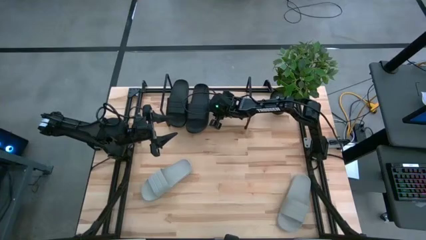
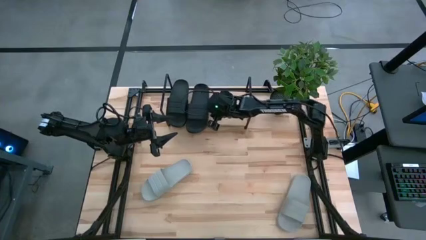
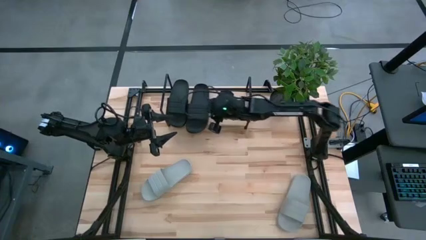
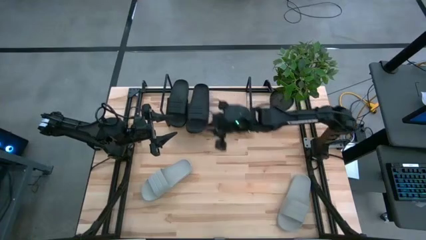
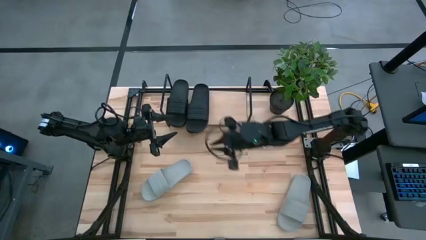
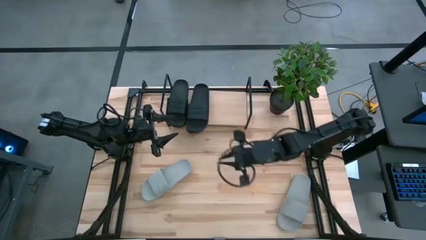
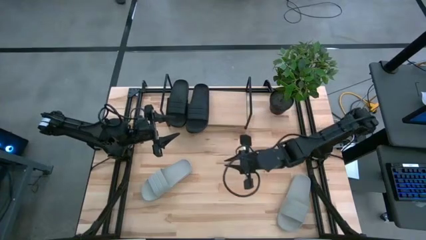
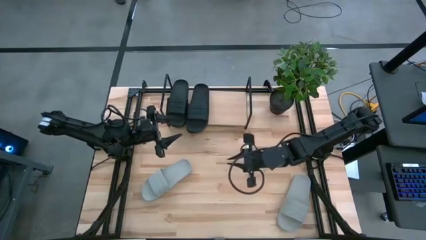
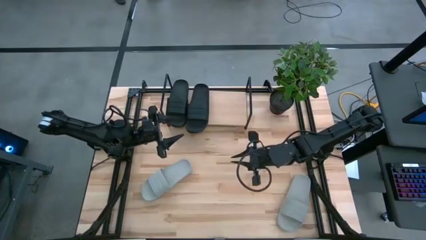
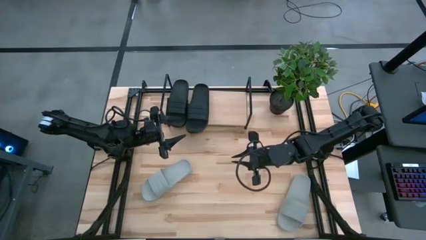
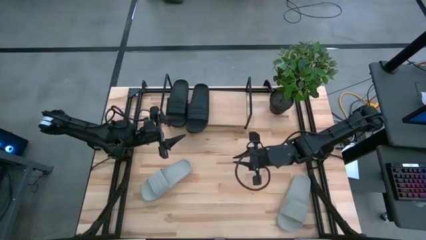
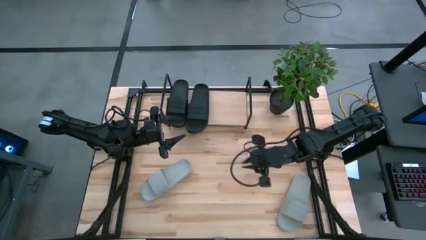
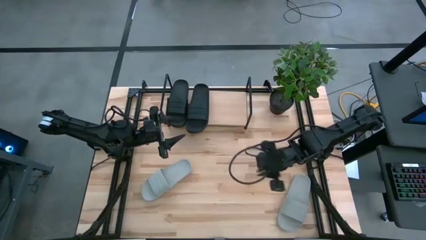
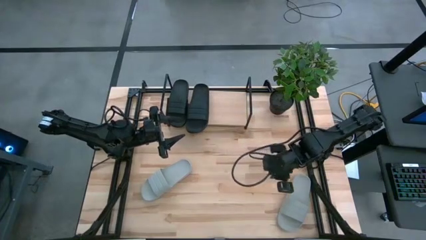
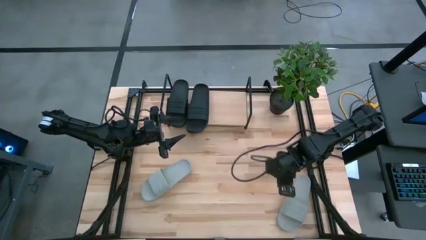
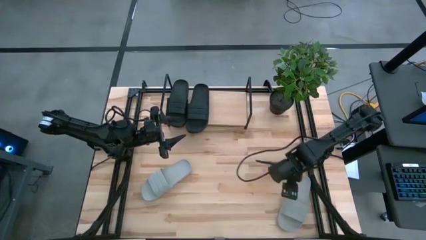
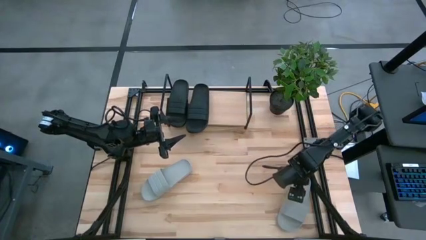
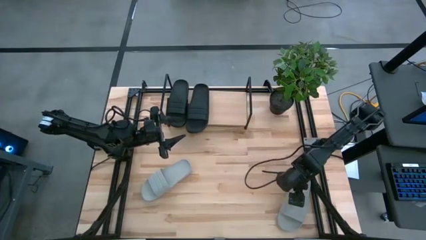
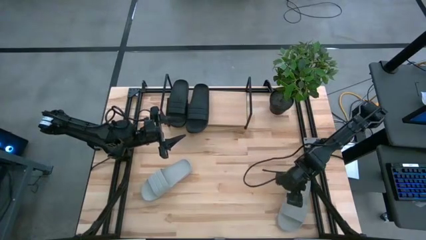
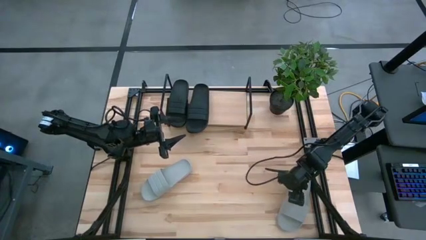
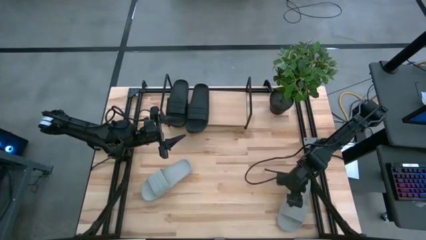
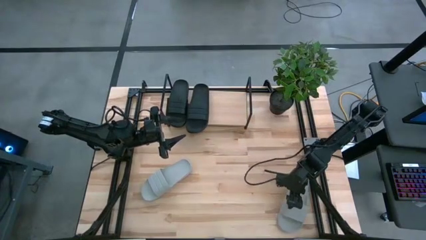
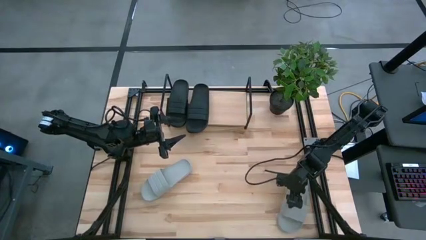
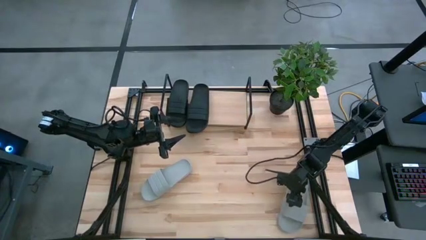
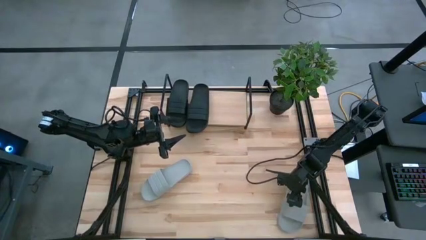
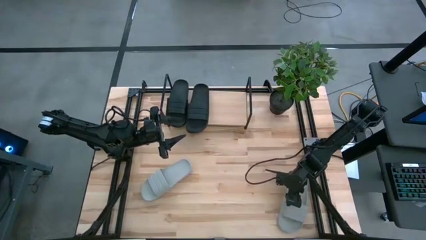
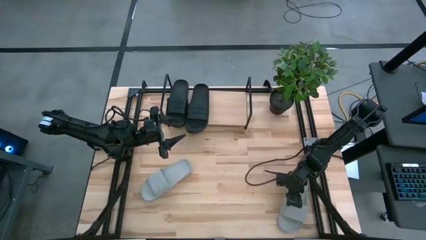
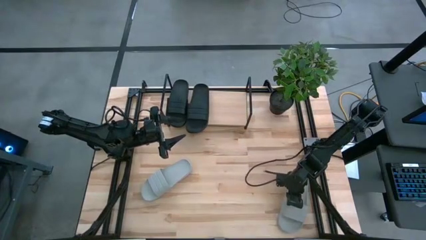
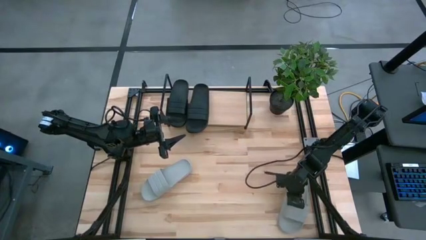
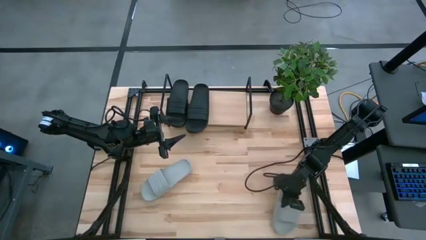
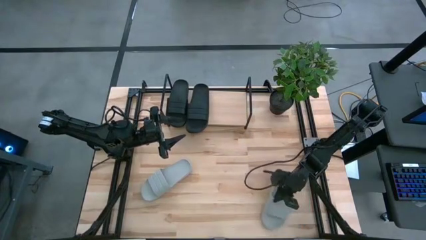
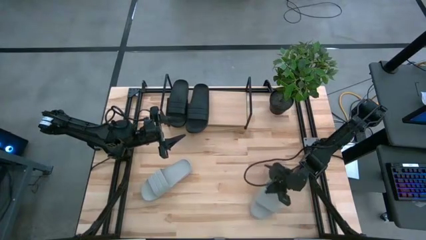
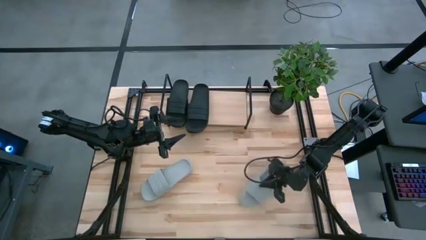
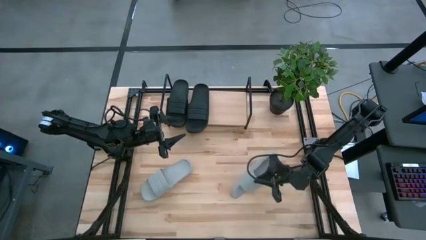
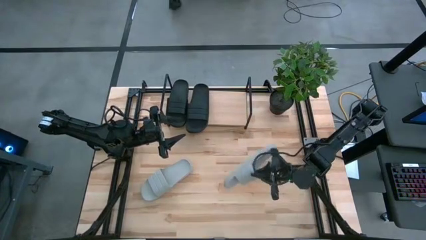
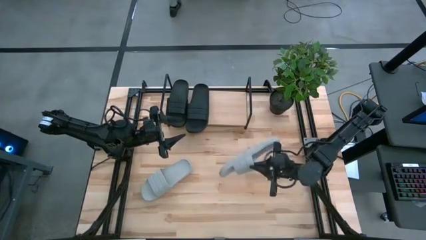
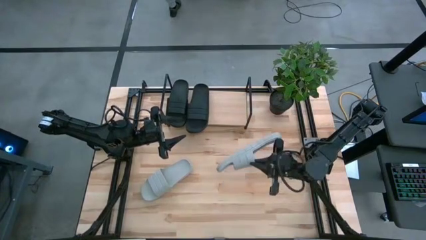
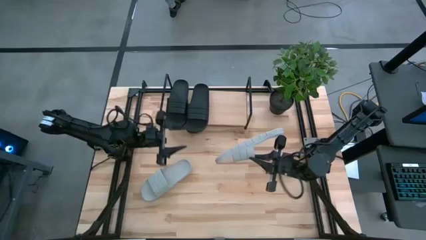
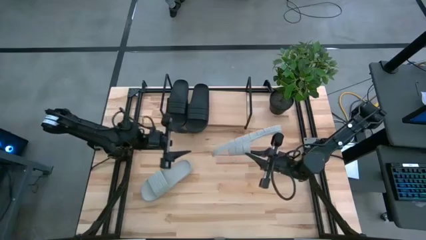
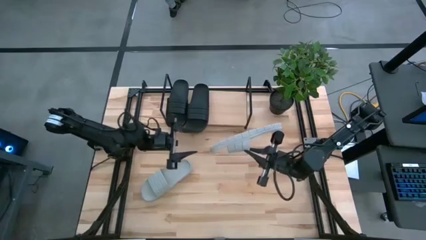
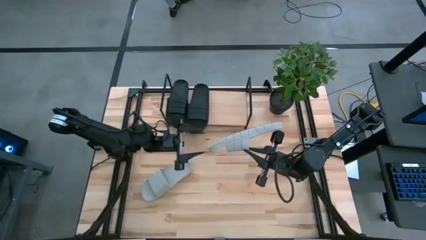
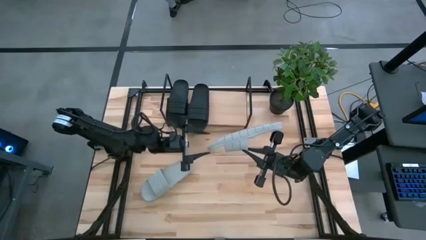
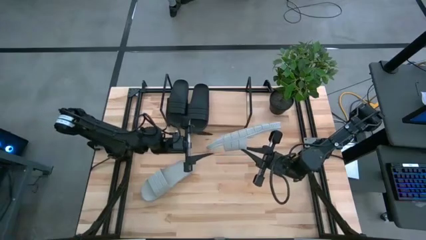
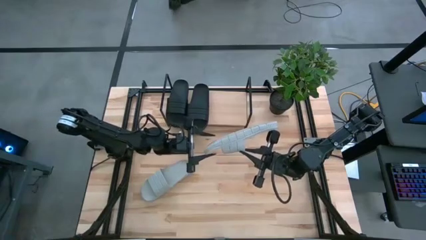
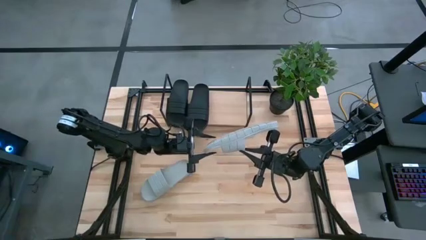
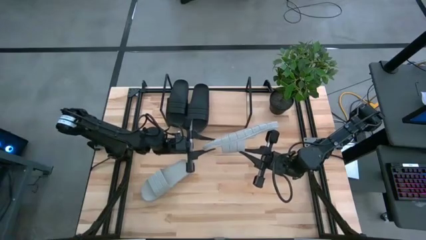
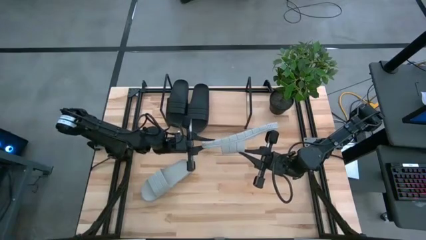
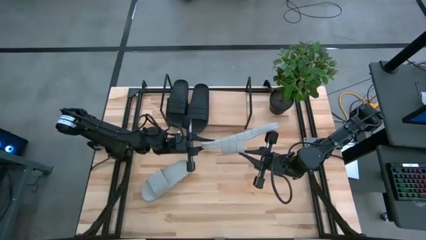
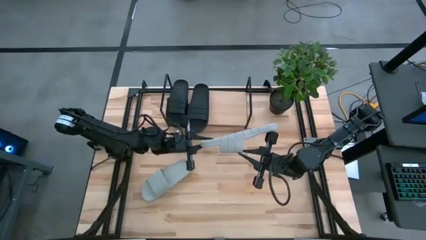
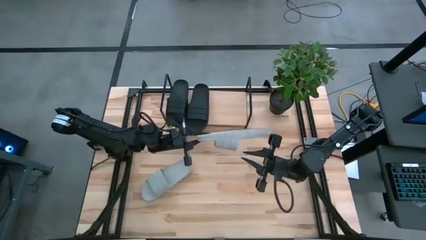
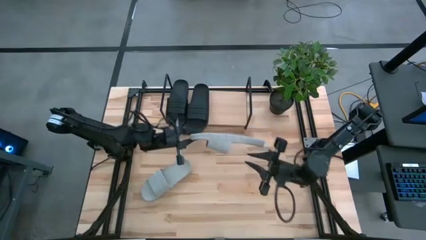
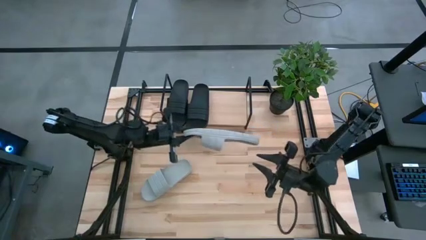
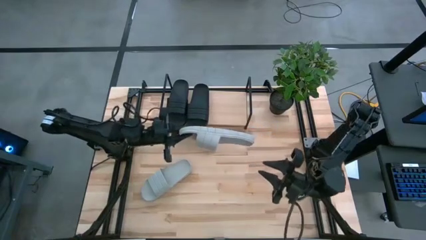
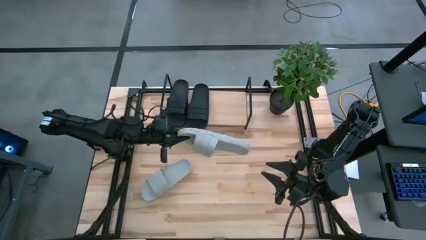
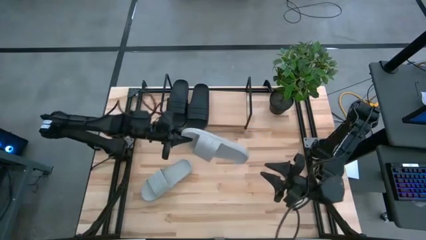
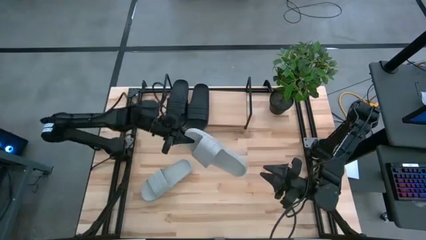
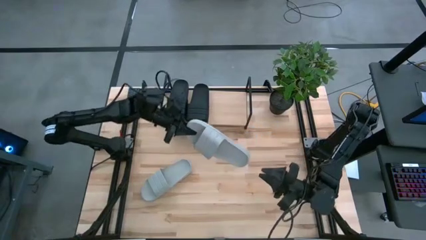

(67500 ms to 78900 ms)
Task: Pick and place slides into the shelf
Put the right gray slipper on the shelf

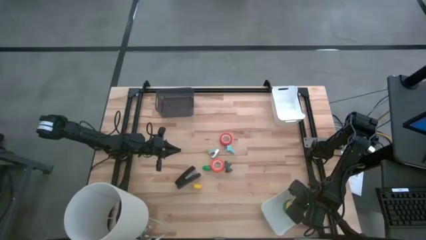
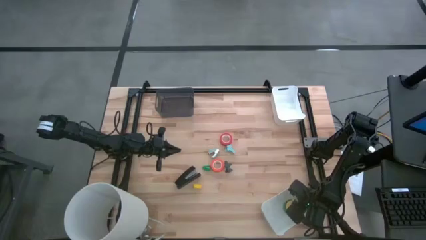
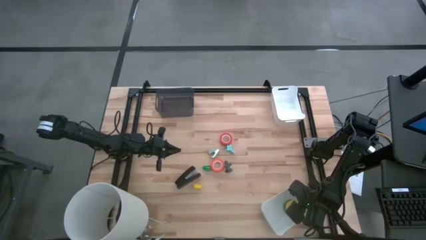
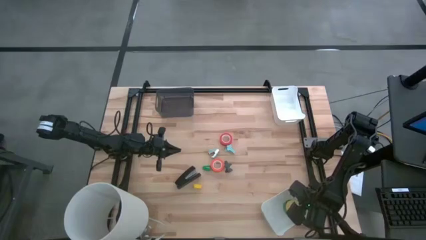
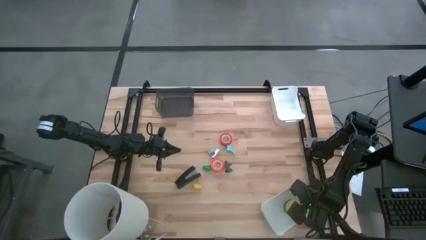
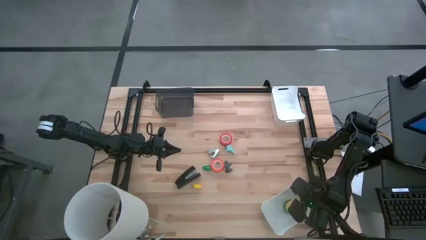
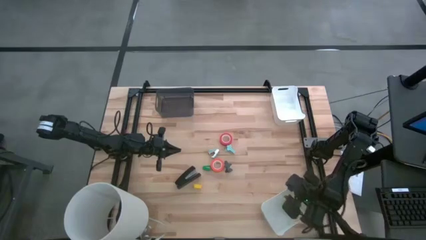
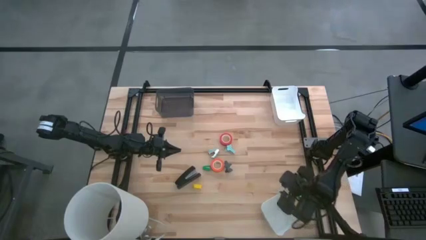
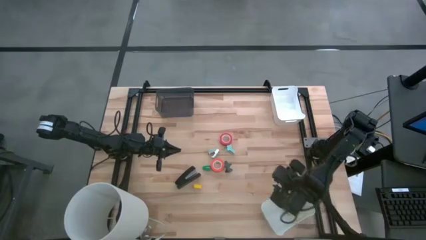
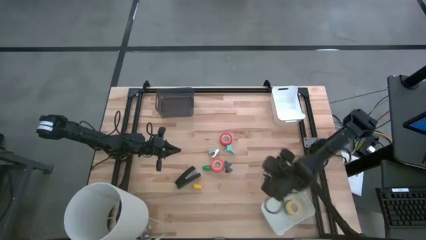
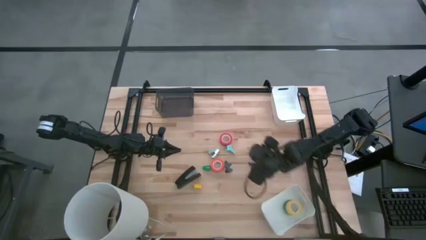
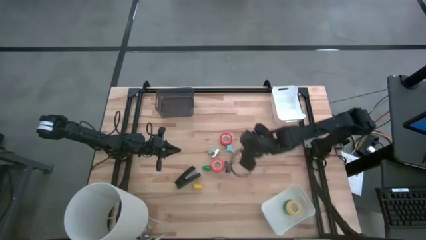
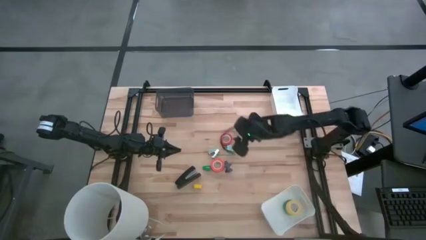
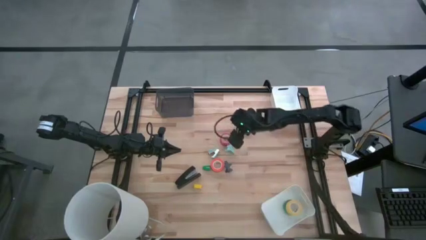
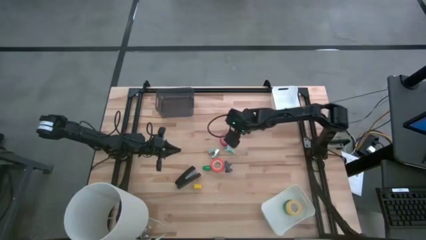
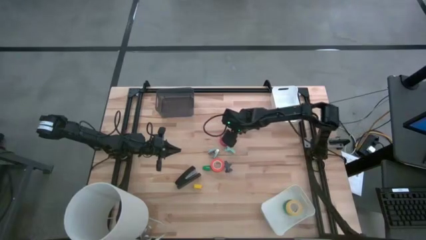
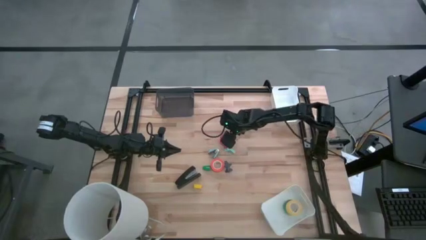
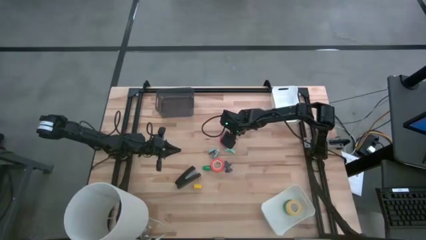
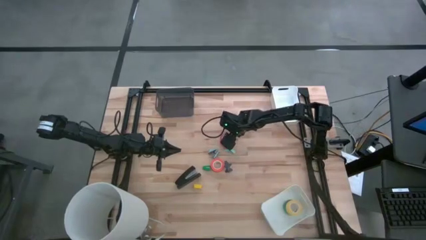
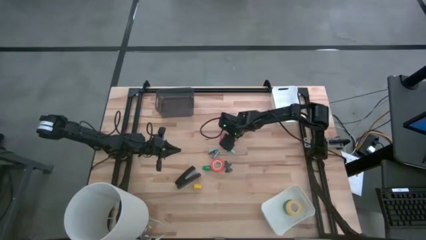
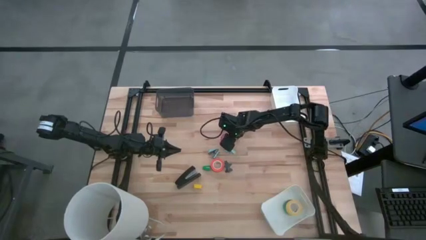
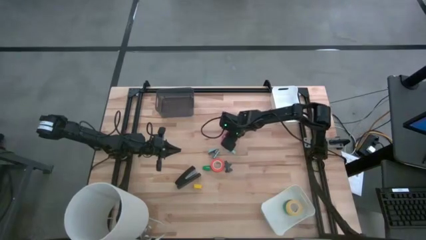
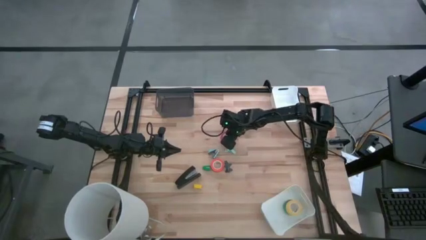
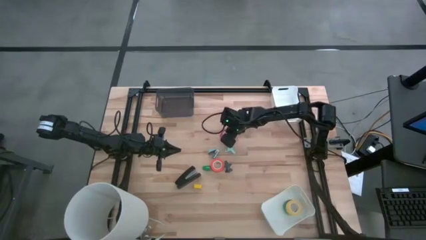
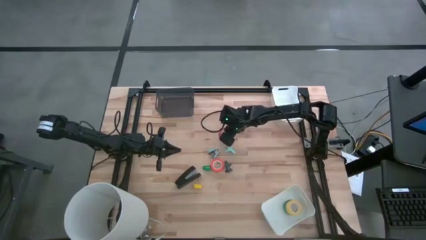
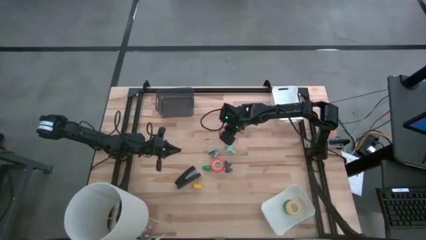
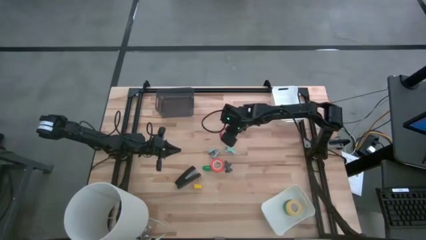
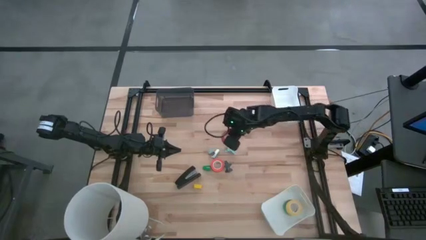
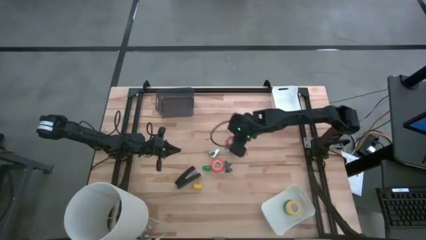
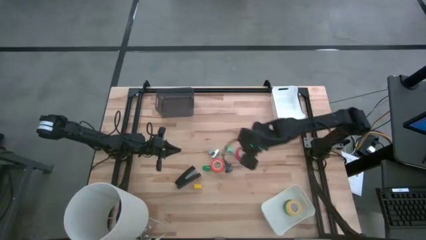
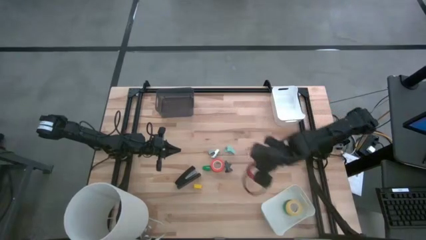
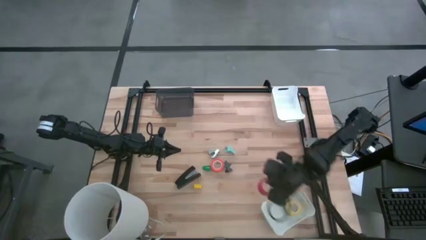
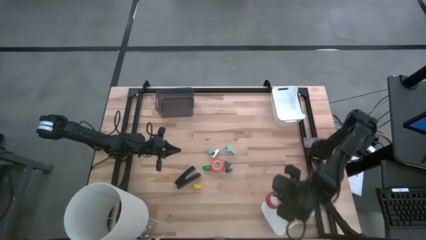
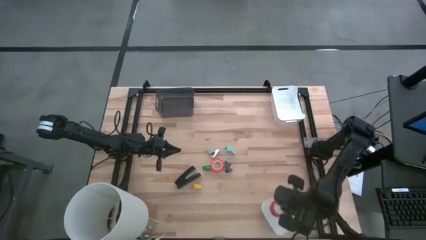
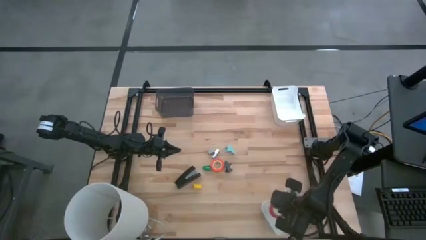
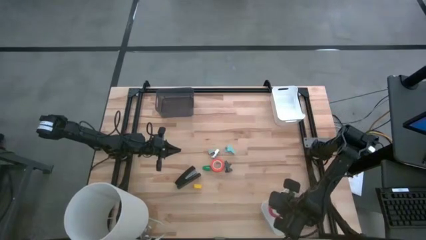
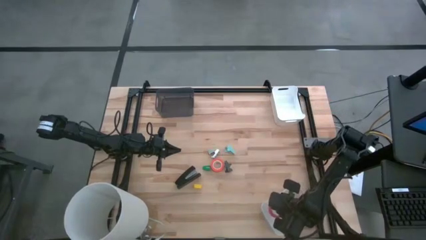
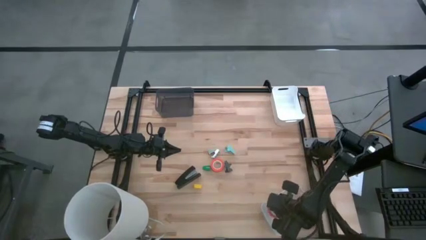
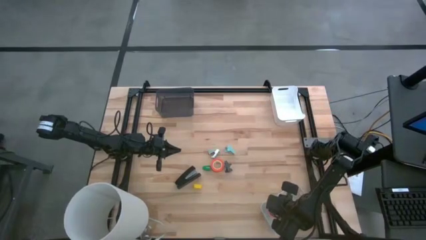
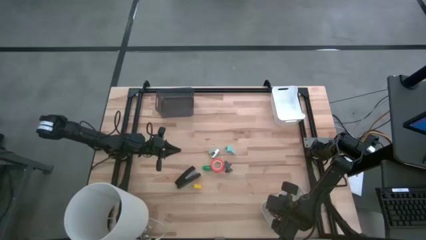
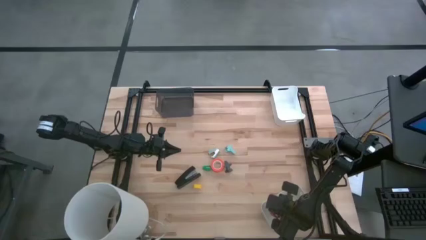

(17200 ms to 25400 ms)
Task: Pick and place Stapler, Stapler remover, tape
Put the red tape into the bottom white bin
